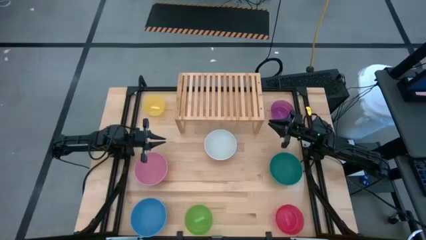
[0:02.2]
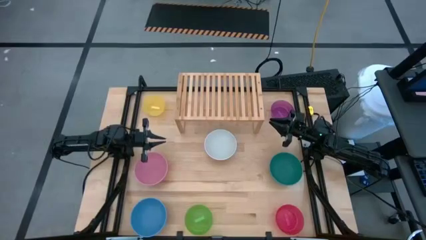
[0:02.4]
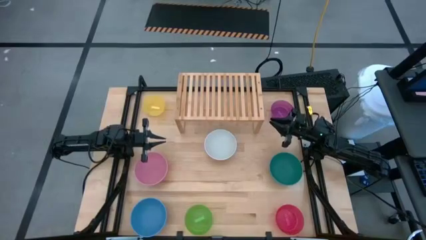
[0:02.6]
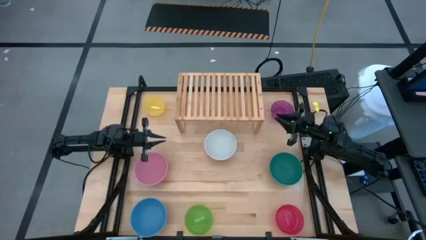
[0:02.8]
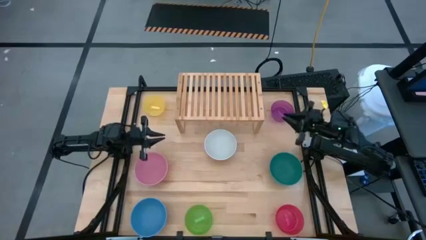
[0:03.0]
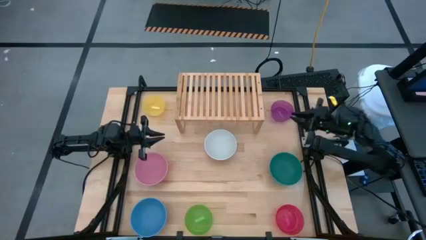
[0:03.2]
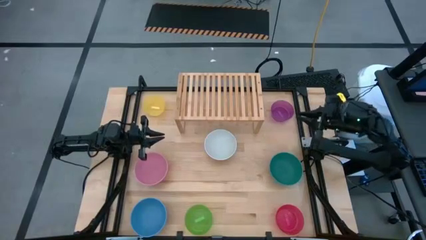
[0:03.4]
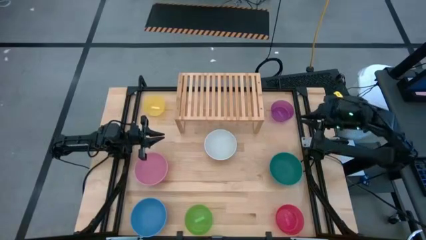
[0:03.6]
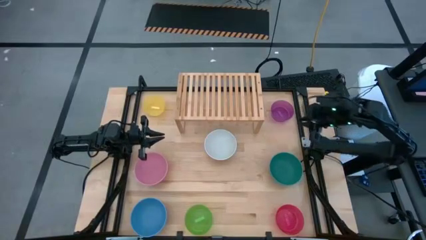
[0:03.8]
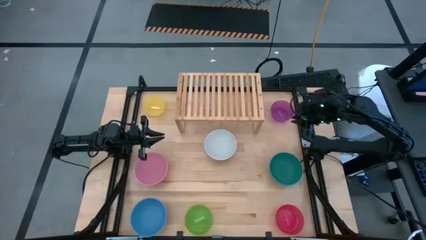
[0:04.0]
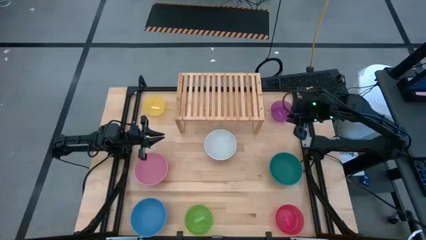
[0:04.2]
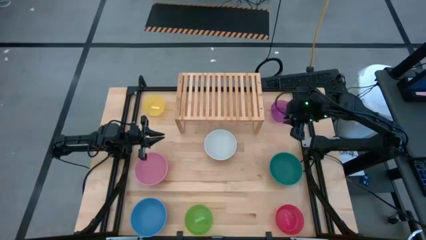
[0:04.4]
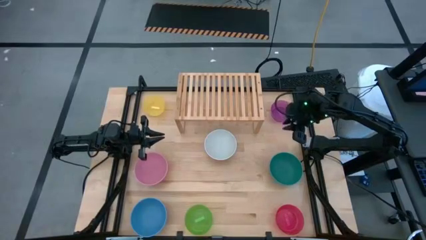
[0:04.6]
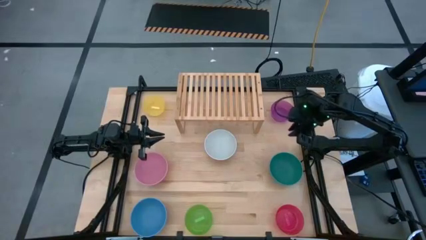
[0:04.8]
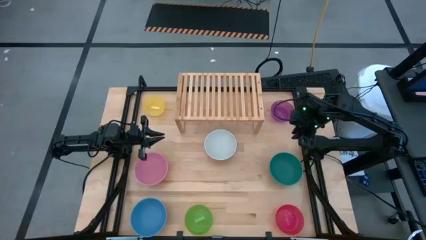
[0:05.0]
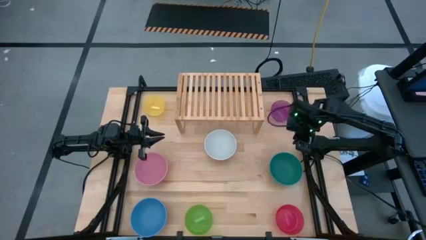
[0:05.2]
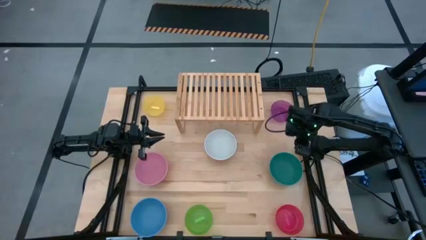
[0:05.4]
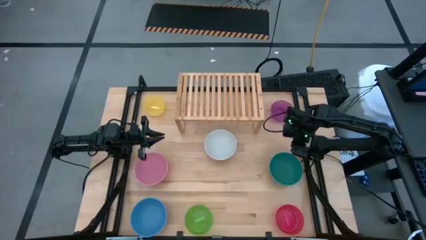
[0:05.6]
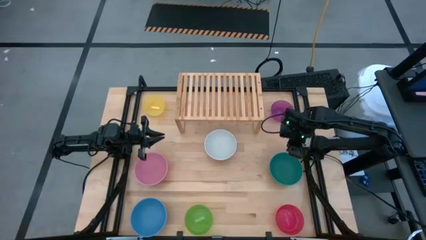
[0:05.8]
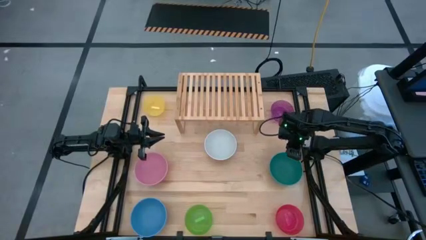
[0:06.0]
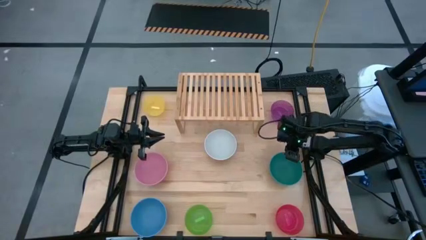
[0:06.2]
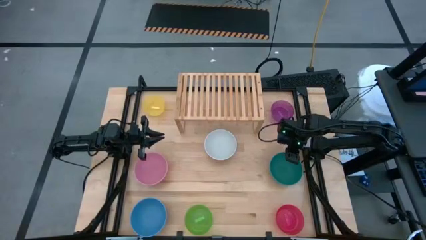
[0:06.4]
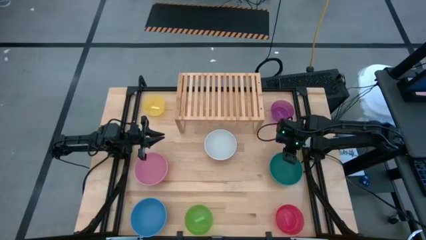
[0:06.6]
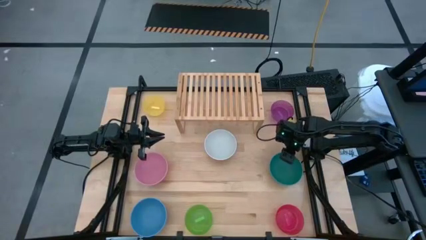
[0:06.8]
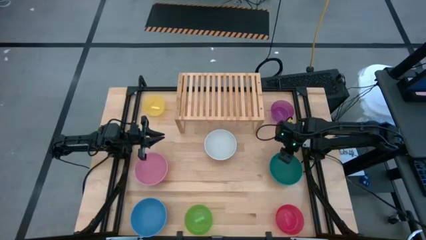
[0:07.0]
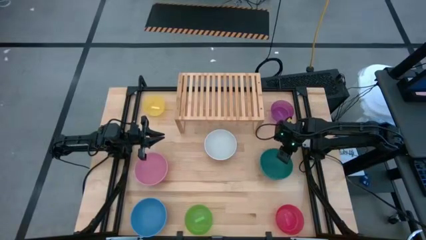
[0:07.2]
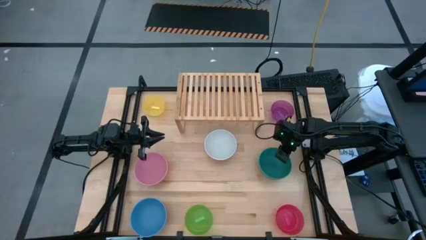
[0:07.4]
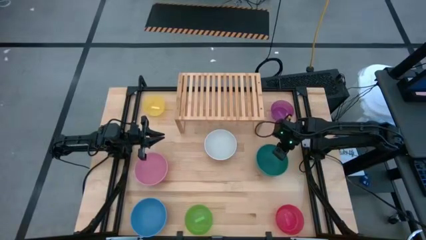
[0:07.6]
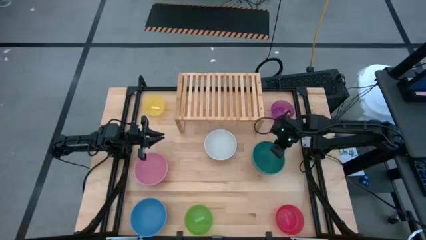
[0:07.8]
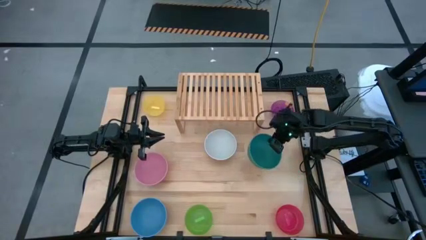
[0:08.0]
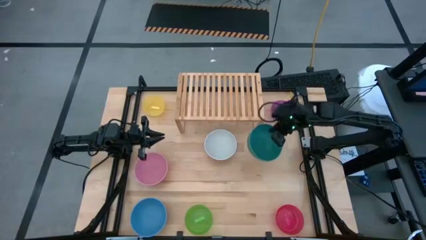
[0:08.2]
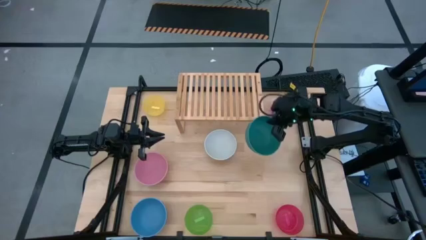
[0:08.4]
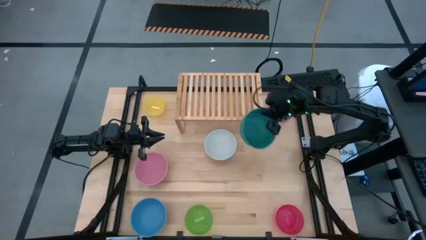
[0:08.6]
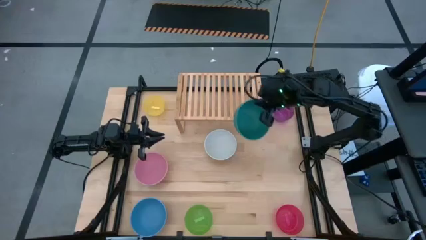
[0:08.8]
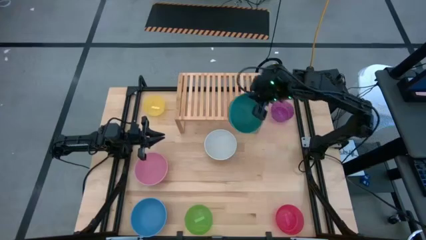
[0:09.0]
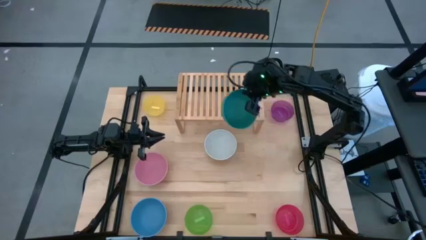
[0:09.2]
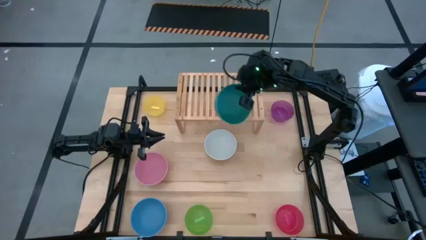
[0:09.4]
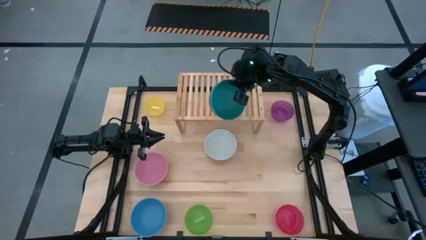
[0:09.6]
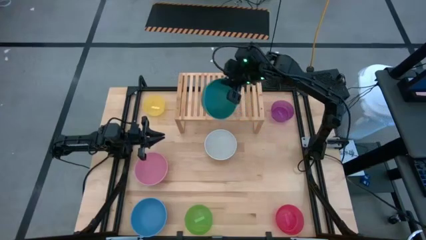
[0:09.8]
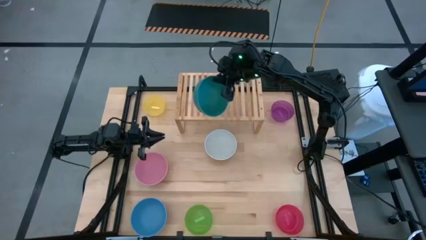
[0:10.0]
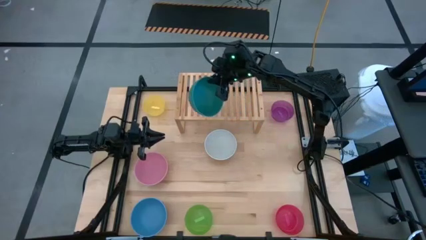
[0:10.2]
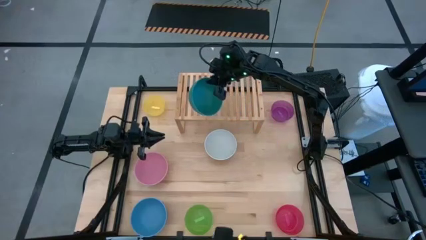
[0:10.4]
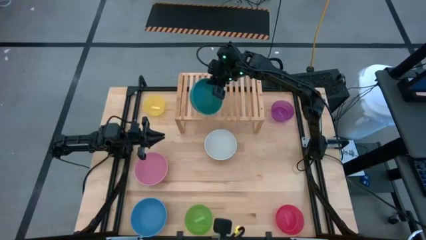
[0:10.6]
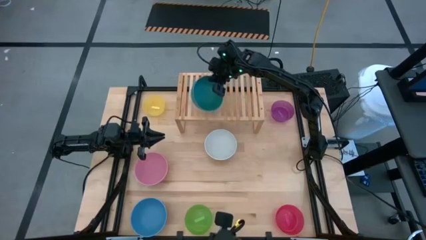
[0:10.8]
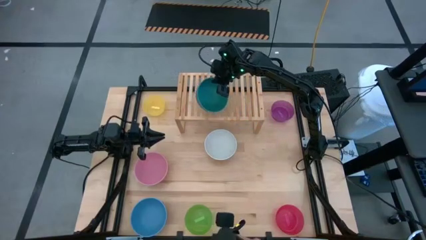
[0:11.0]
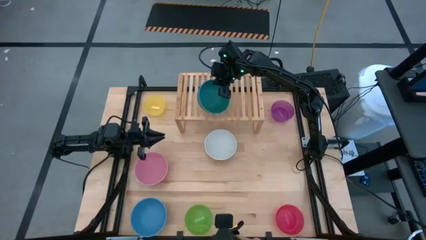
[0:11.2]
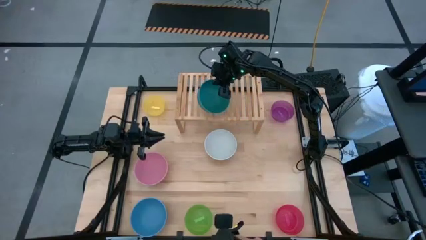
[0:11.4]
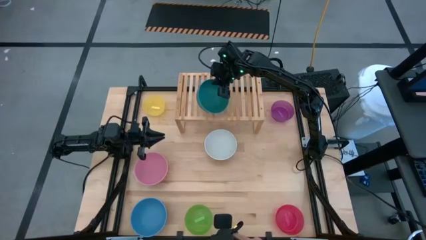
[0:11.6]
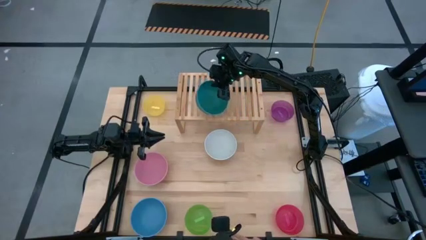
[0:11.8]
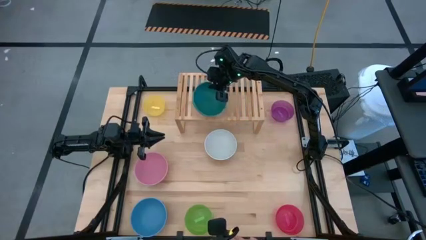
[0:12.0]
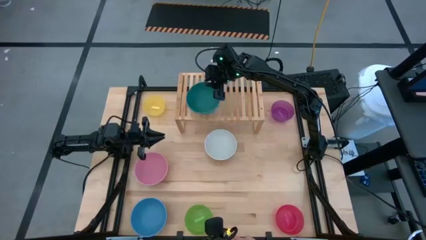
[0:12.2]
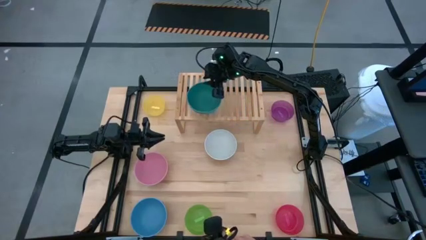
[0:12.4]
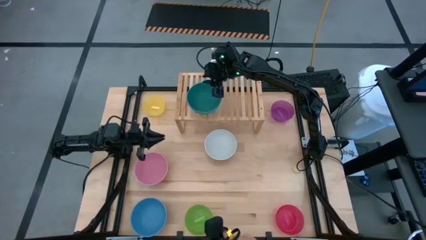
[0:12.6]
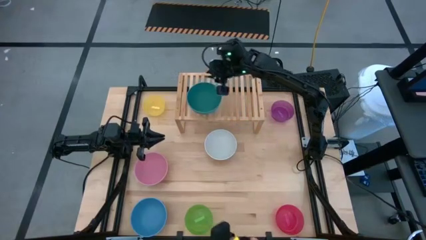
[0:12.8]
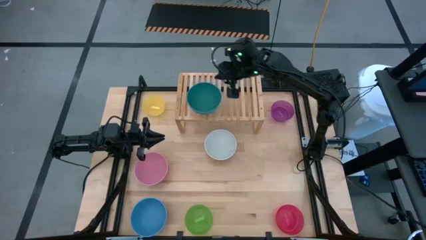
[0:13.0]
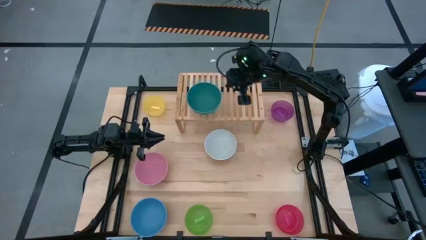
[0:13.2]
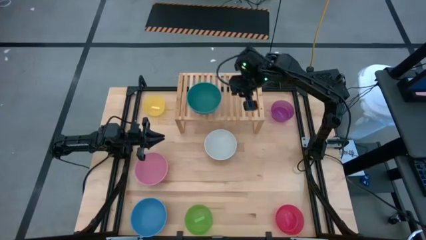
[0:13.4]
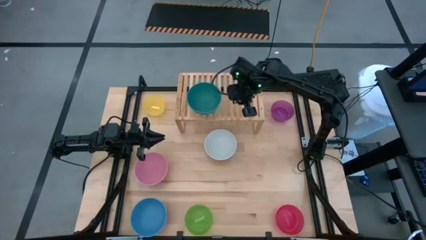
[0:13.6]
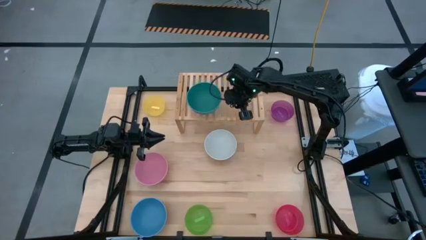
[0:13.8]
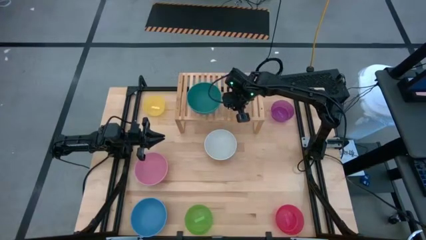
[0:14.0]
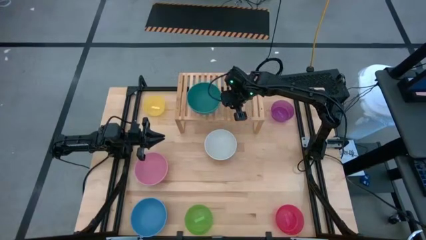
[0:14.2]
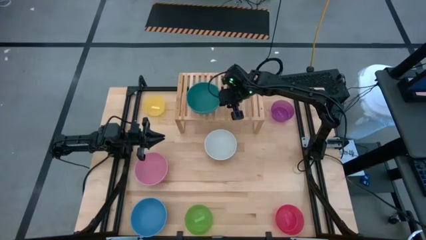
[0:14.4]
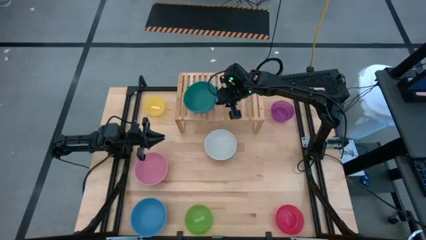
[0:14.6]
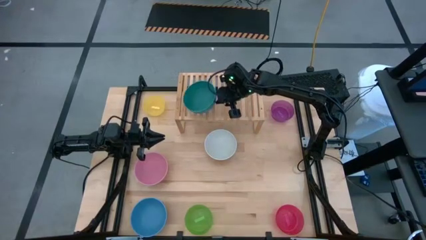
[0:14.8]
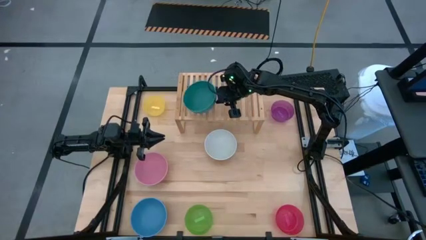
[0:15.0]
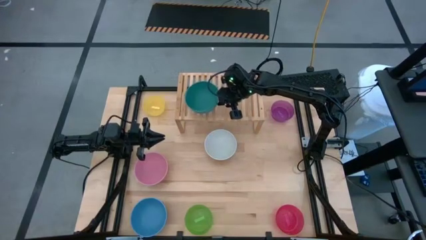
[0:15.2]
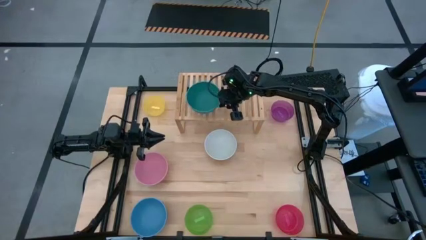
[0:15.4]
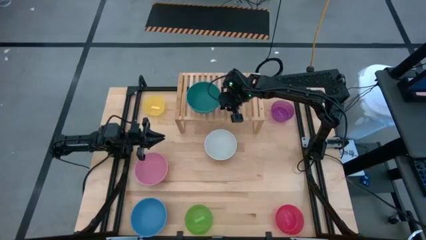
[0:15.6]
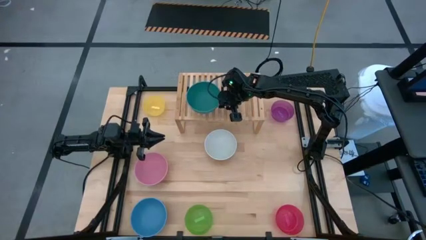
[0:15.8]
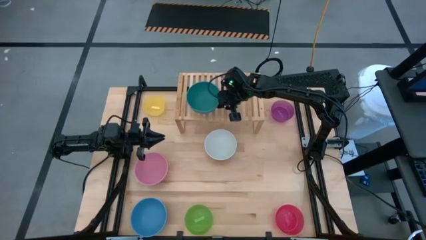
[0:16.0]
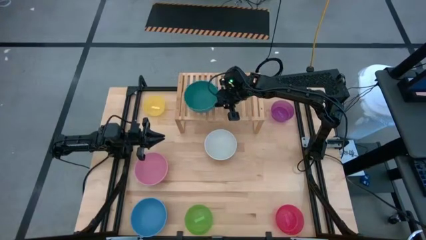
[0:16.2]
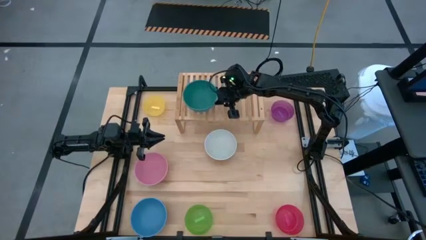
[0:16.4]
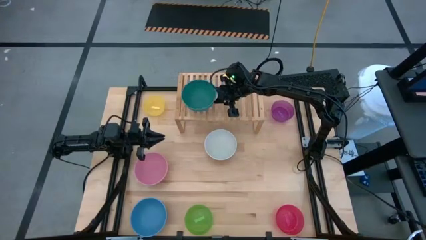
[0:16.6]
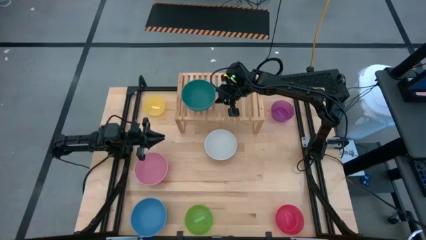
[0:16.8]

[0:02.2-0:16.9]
Task: Place and stack bowls onto a shelf
Put the green bowl on the shelf
